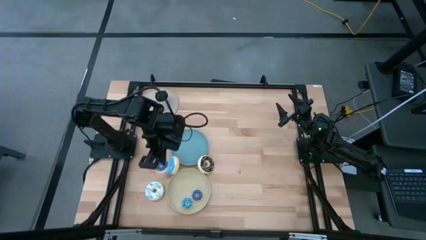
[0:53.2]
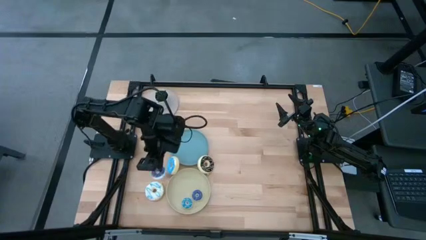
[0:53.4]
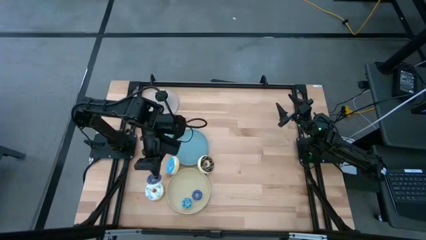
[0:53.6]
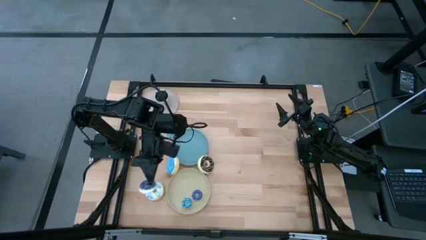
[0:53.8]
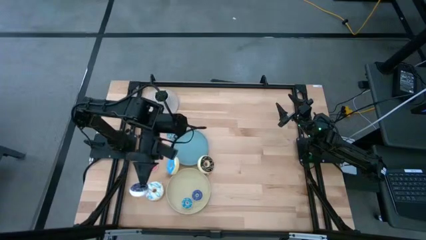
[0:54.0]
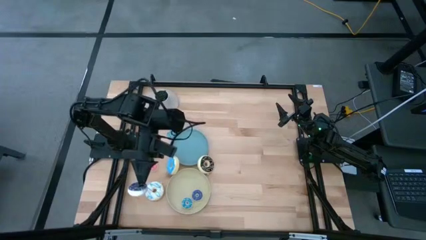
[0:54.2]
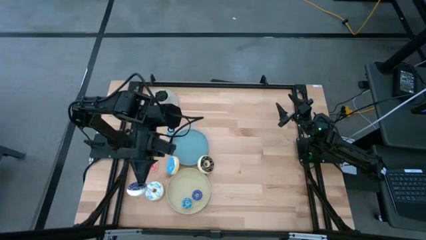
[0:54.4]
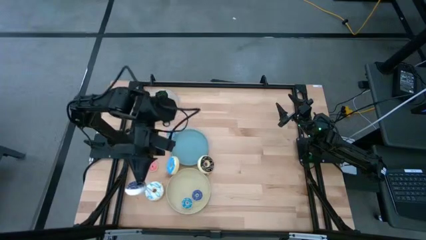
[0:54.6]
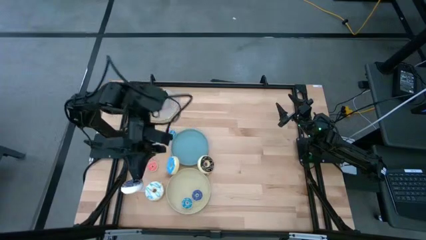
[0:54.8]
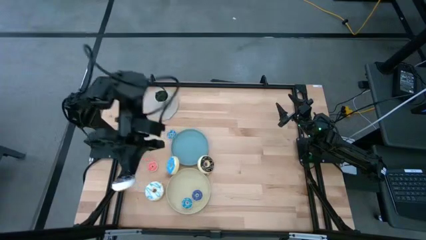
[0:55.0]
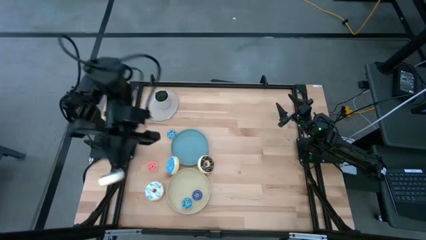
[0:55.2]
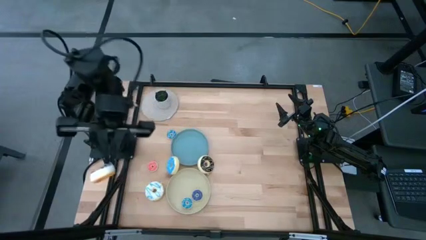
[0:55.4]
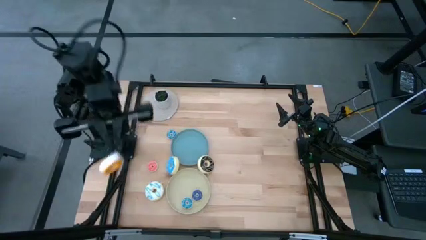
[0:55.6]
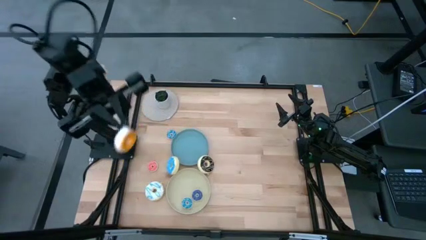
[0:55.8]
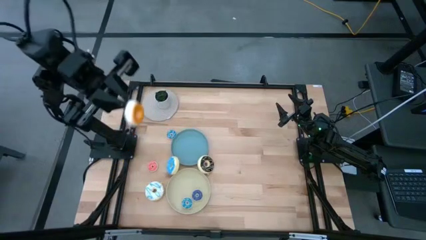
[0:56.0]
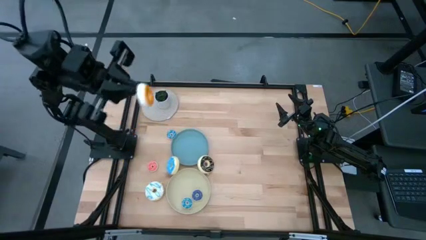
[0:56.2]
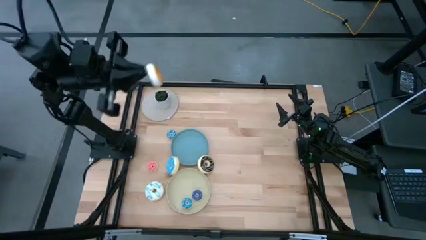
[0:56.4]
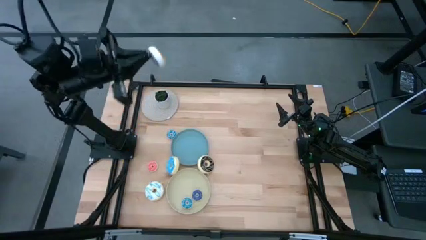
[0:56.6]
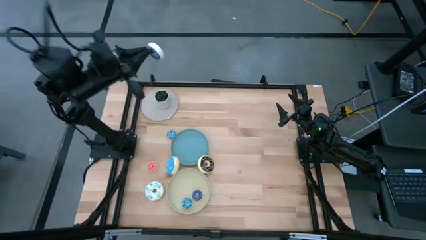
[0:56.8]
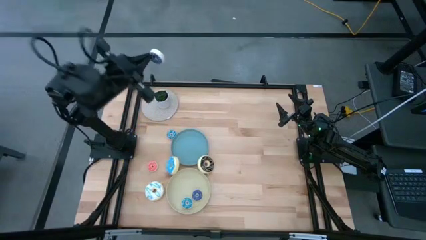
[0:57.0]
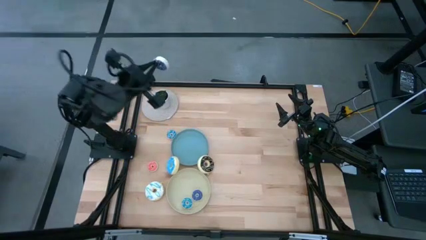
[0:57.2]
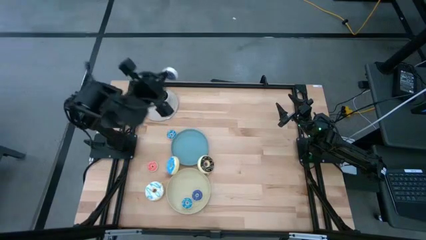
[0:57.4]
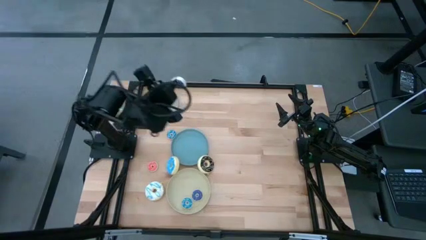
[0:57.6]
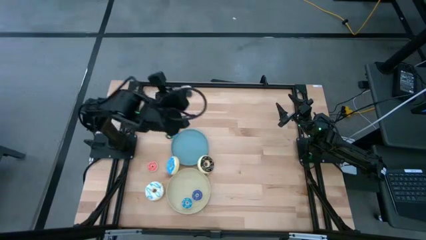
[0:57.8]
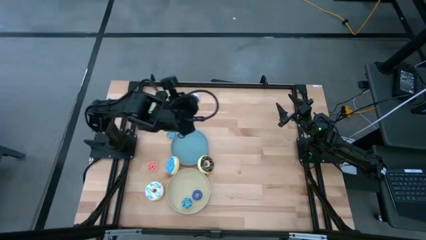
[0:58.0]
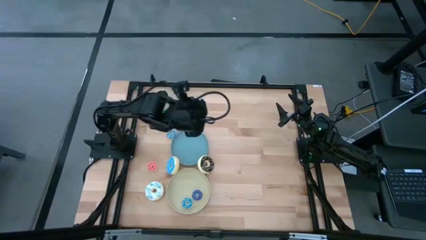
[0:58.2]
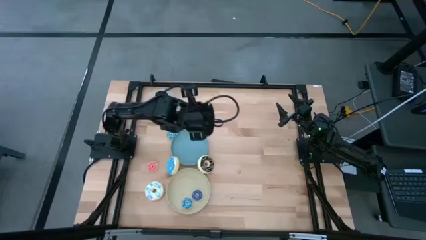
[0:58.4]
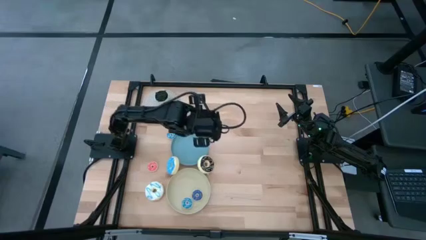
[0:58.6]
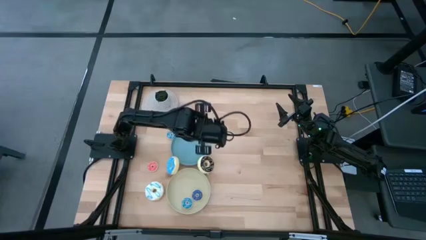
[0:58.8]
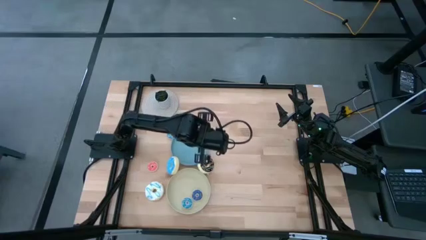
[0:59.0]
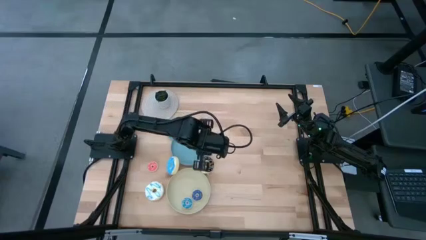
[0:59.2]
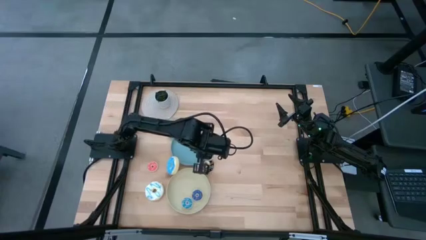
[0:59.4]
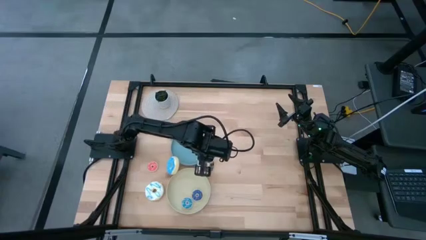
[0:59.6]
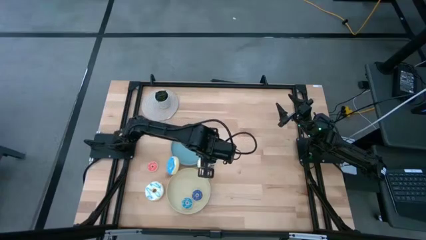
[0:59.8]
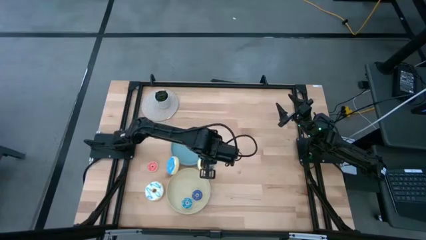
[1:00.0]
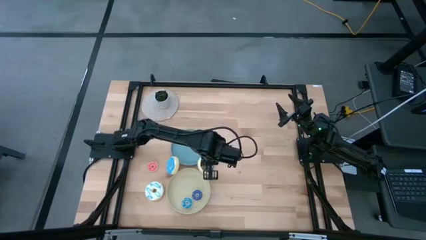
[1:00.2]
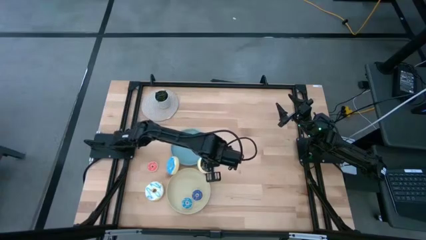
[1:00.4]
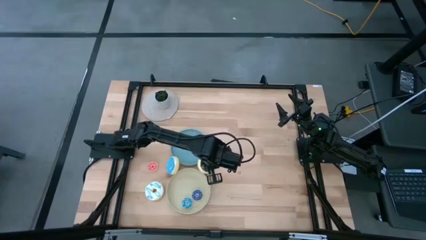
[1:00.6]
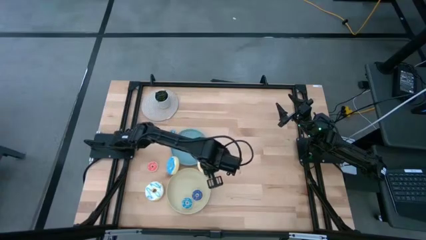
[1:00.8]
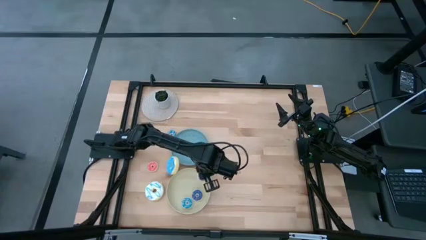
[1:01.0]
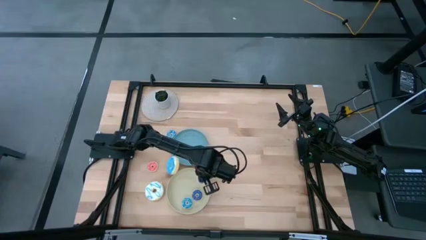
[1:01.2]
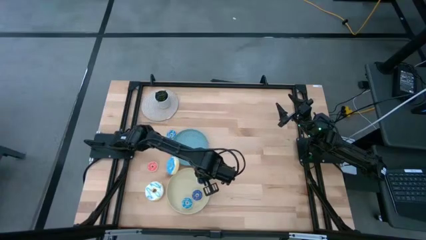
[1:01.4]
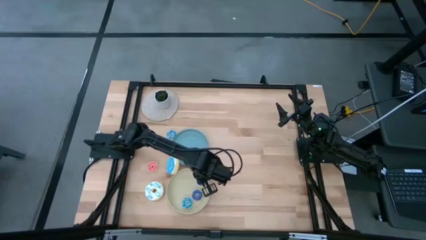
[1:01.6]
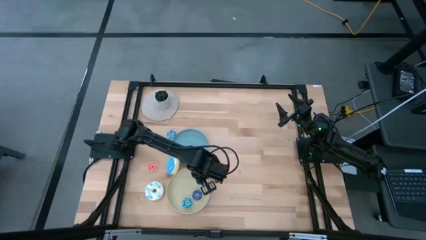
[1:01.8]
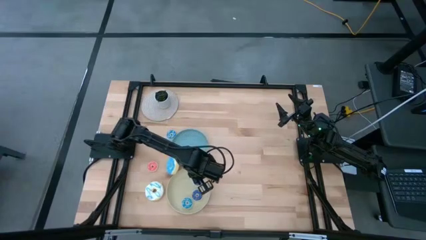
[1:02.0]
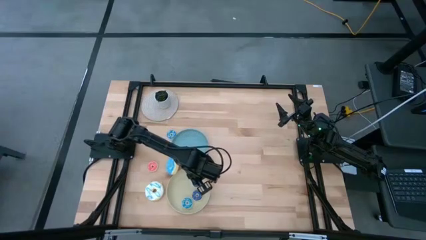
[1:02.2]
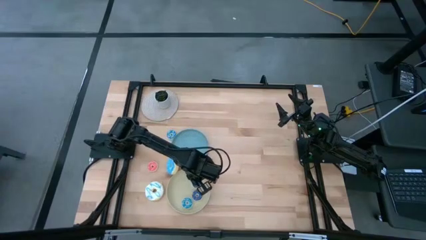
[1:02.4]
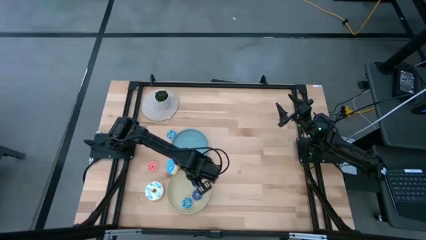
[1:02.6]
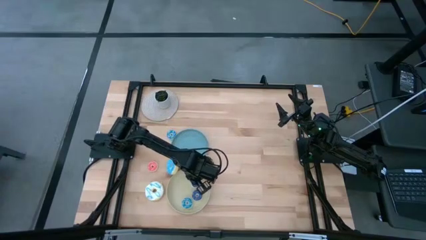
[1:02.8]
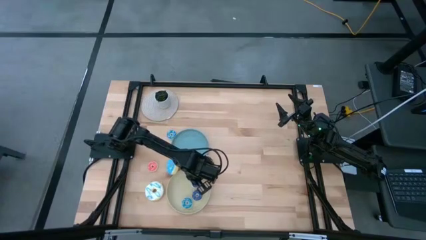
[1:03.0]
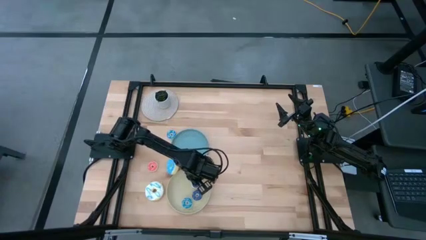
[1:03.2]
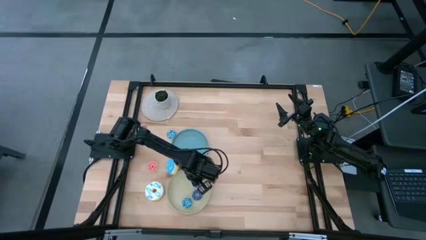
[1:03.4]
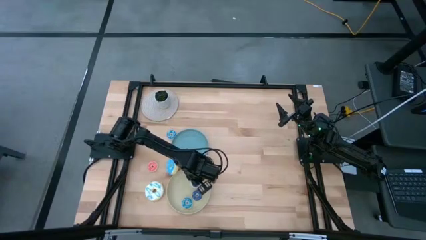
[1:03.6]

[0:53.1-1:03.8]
Task: Pick & Place donuts
Put the small blue donut on the gray plate
